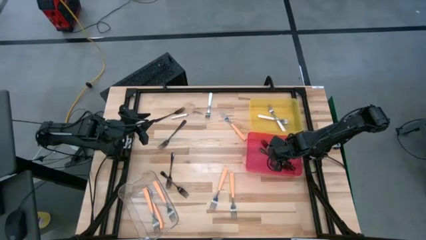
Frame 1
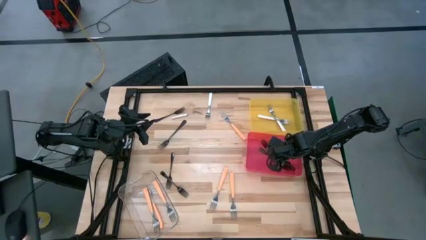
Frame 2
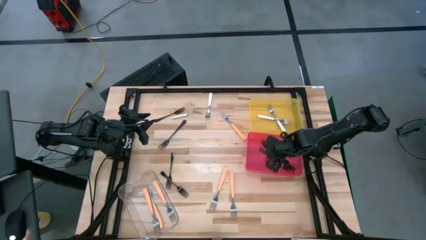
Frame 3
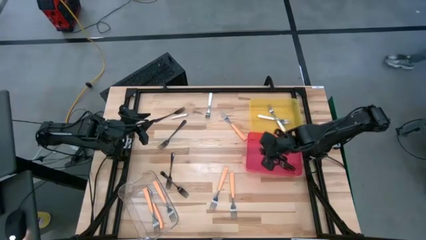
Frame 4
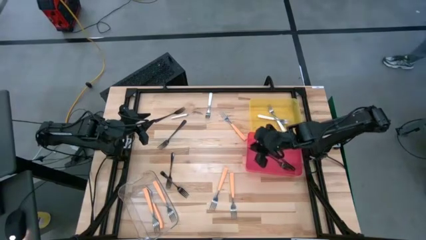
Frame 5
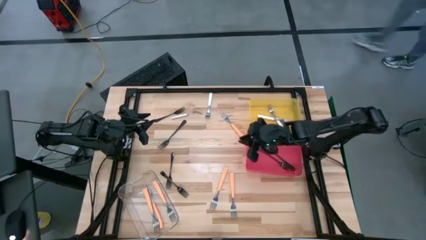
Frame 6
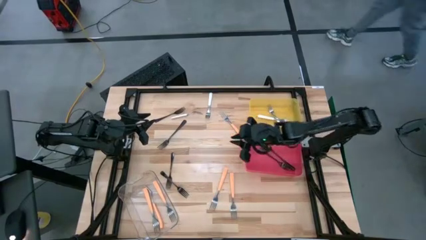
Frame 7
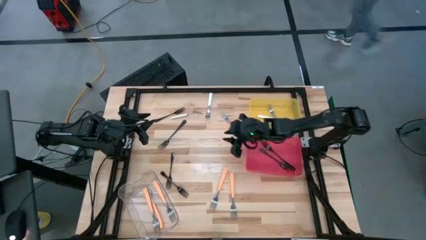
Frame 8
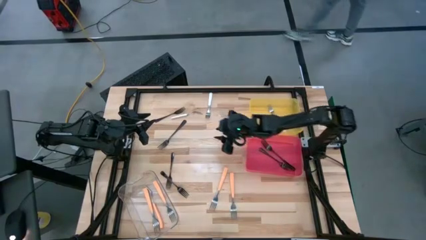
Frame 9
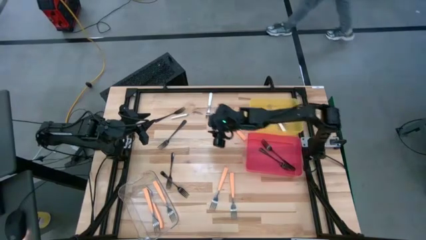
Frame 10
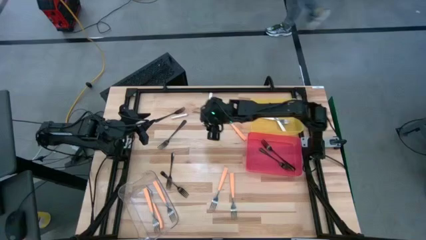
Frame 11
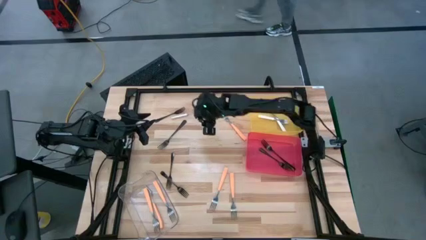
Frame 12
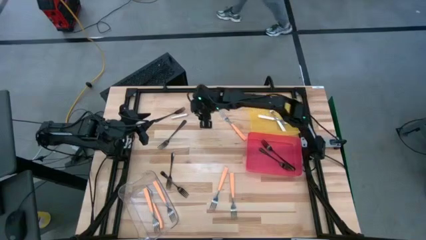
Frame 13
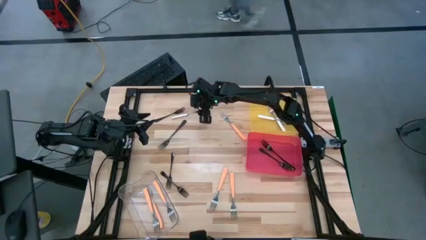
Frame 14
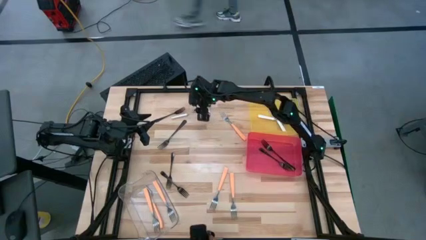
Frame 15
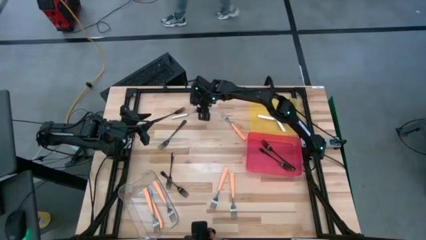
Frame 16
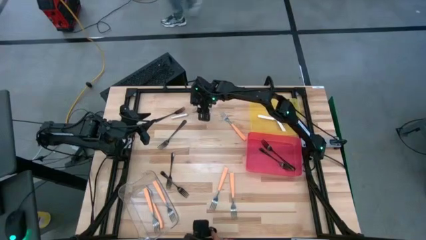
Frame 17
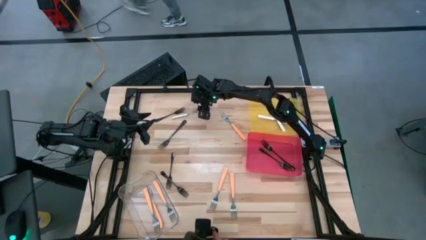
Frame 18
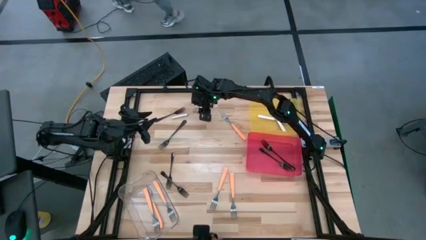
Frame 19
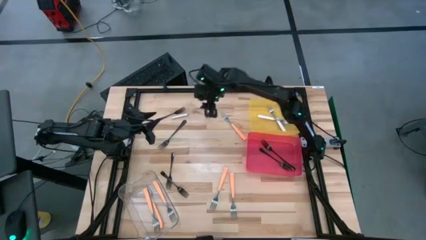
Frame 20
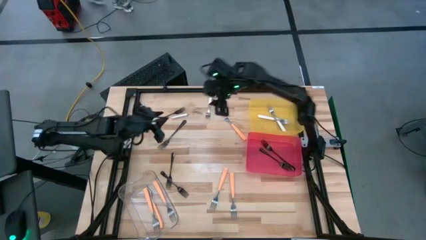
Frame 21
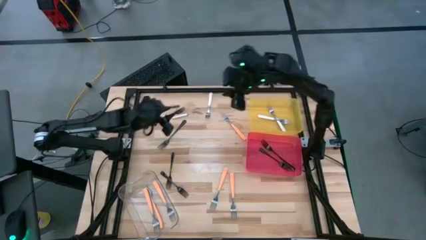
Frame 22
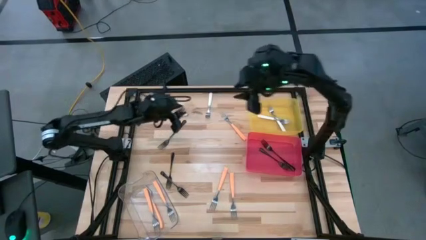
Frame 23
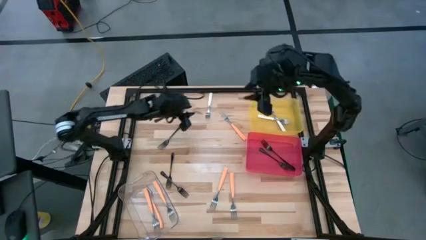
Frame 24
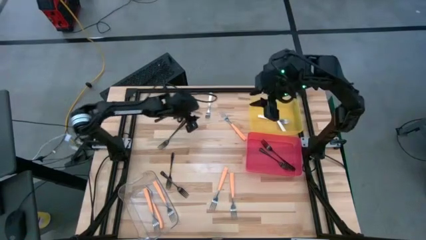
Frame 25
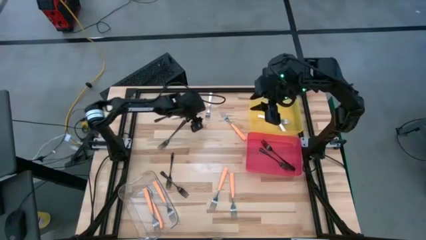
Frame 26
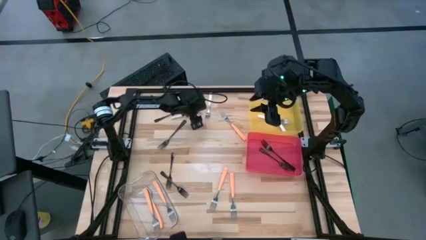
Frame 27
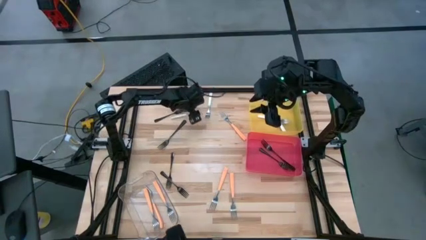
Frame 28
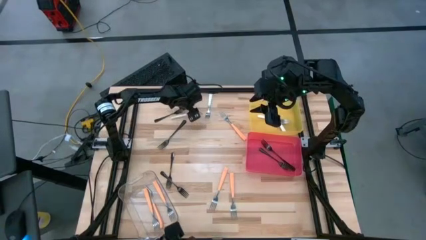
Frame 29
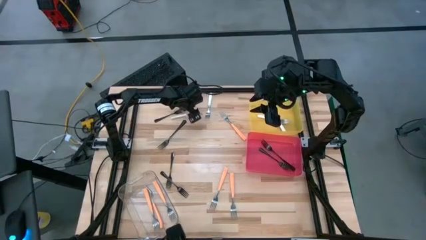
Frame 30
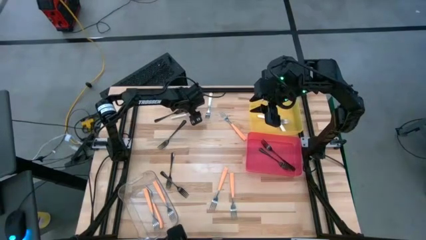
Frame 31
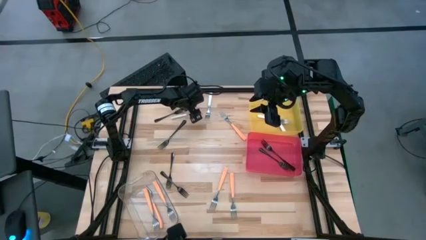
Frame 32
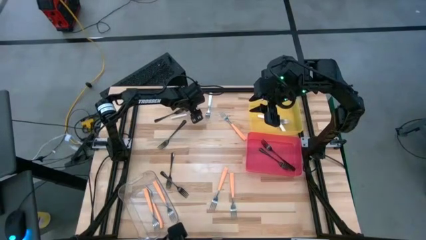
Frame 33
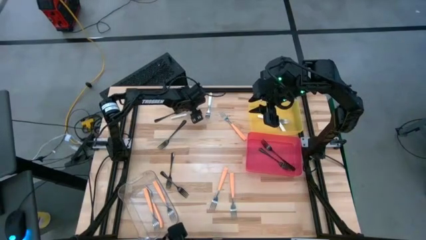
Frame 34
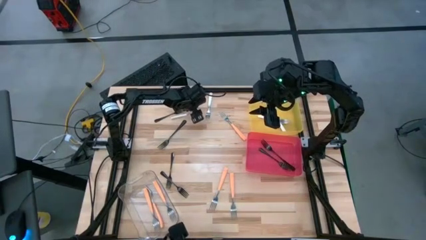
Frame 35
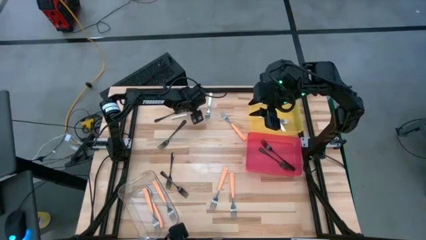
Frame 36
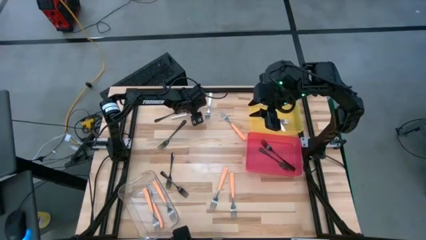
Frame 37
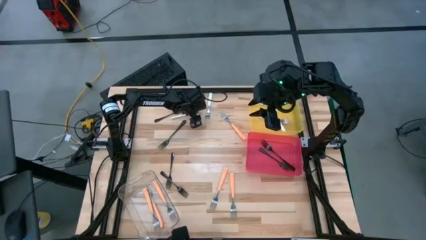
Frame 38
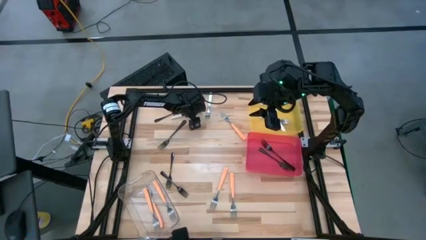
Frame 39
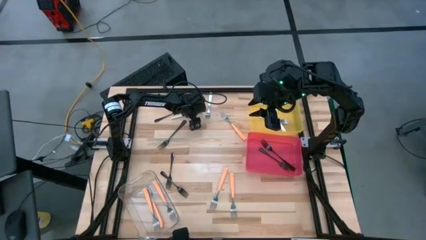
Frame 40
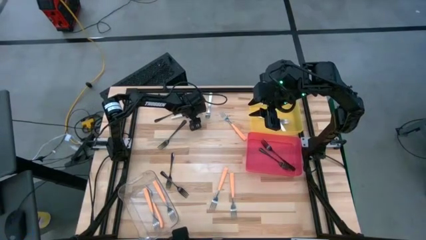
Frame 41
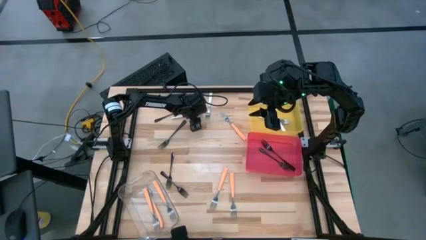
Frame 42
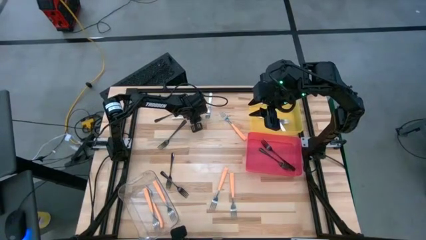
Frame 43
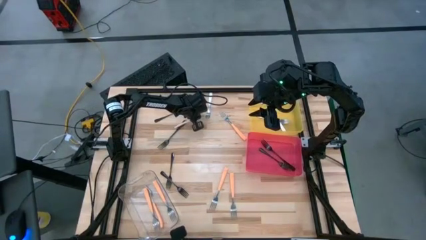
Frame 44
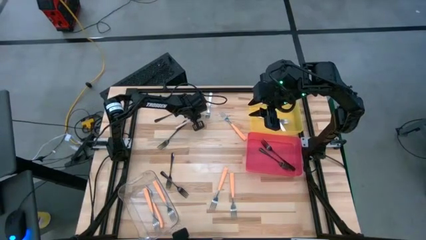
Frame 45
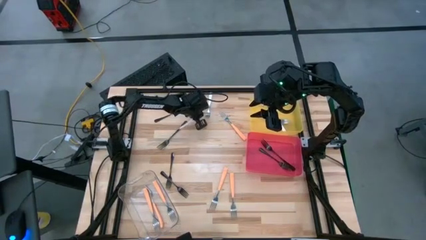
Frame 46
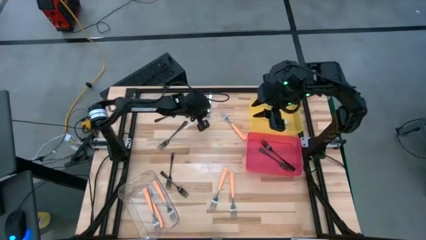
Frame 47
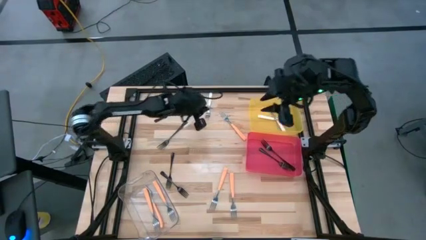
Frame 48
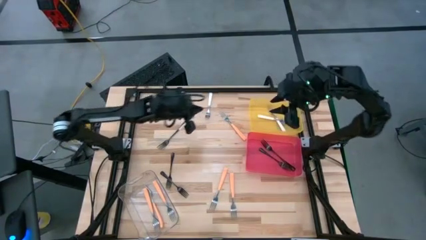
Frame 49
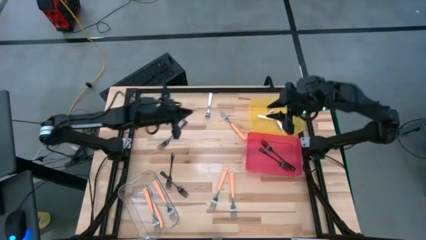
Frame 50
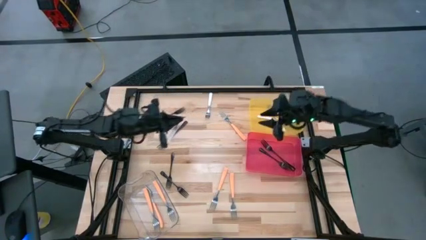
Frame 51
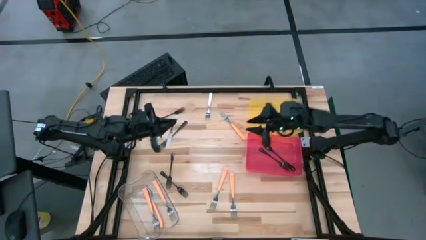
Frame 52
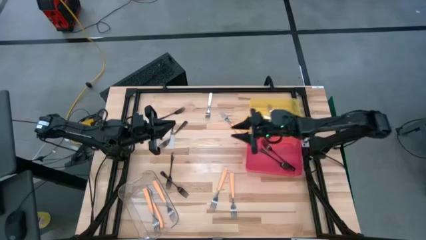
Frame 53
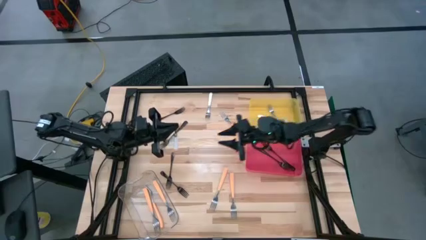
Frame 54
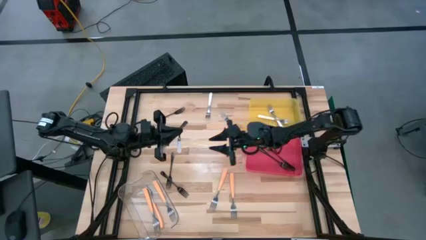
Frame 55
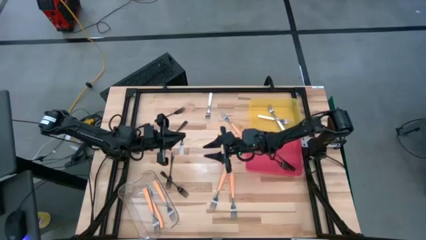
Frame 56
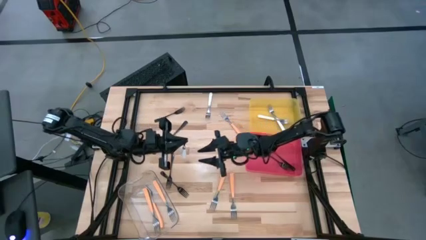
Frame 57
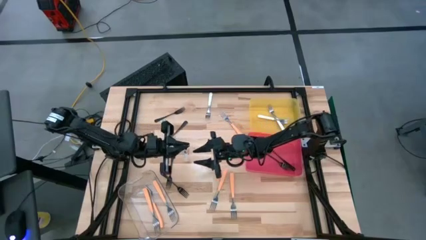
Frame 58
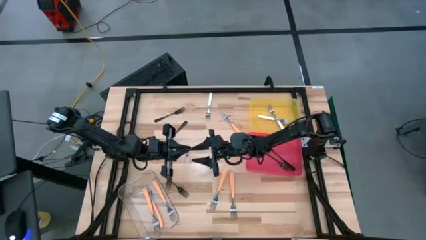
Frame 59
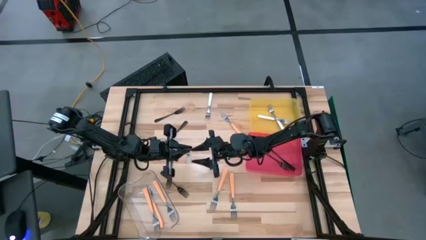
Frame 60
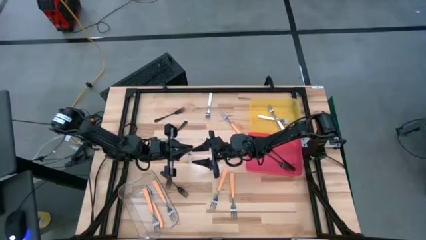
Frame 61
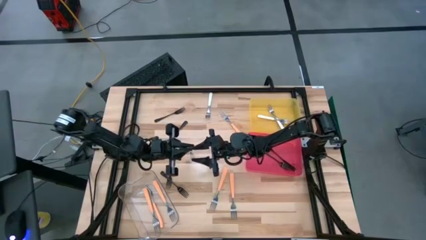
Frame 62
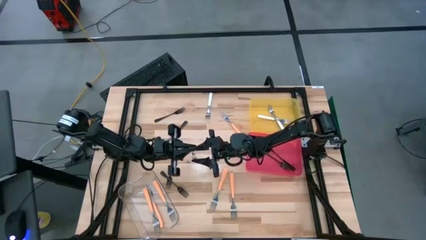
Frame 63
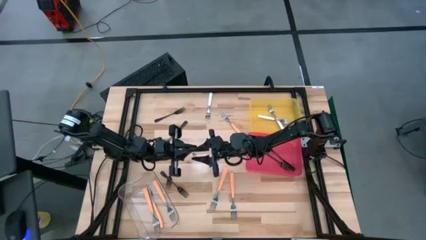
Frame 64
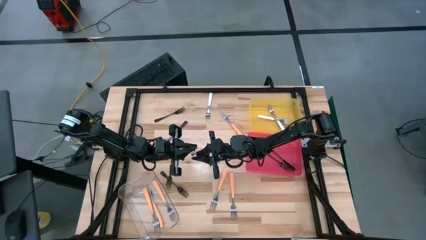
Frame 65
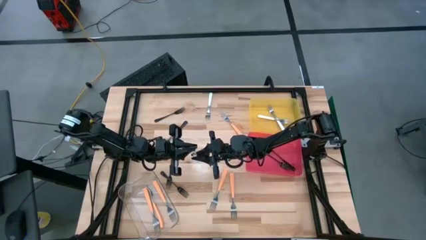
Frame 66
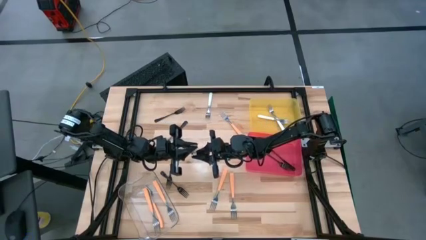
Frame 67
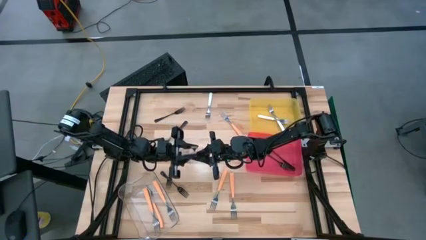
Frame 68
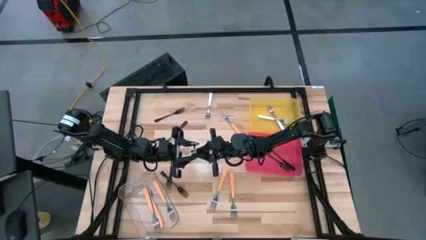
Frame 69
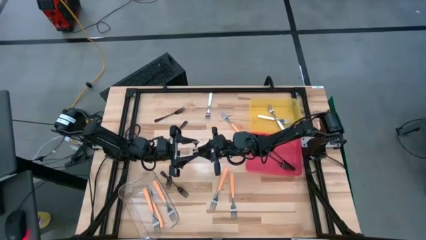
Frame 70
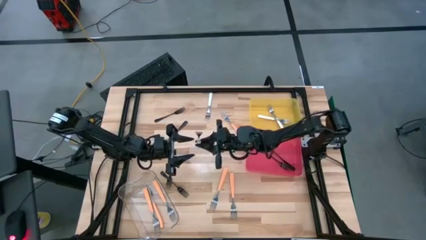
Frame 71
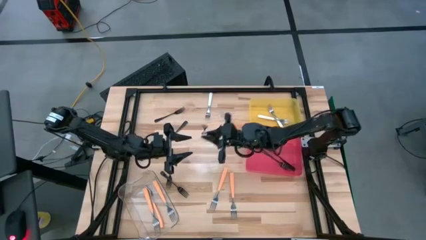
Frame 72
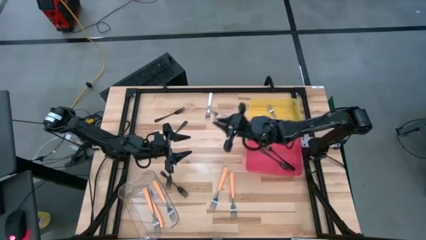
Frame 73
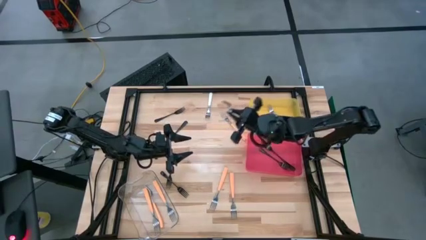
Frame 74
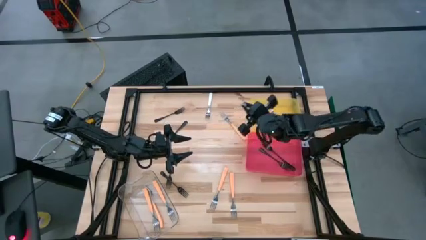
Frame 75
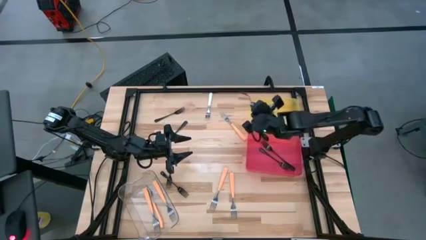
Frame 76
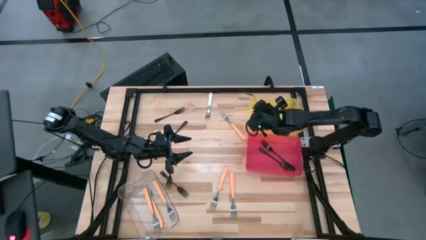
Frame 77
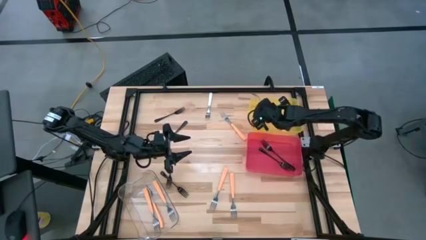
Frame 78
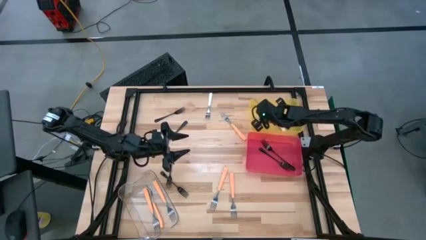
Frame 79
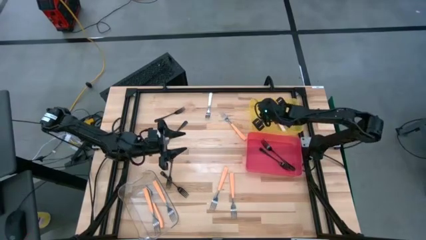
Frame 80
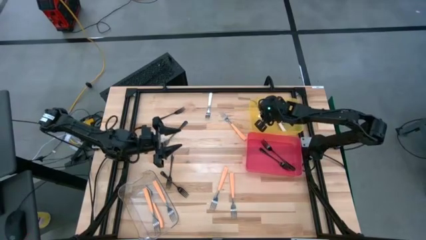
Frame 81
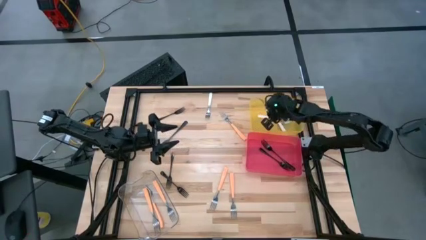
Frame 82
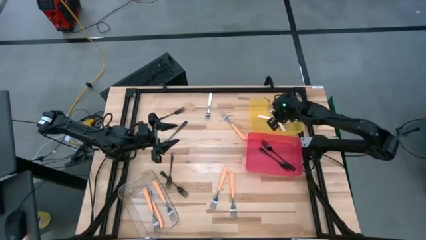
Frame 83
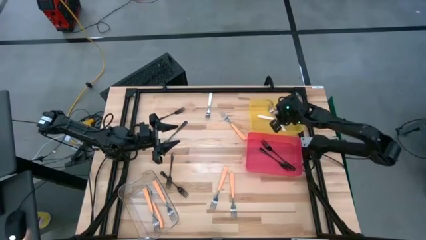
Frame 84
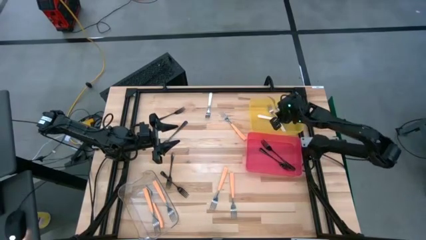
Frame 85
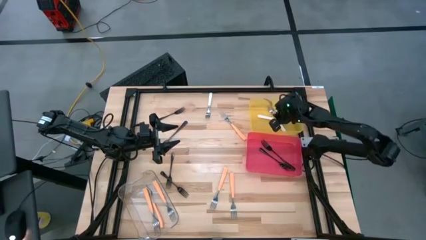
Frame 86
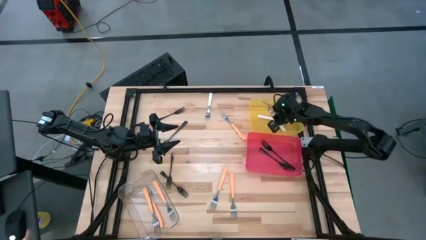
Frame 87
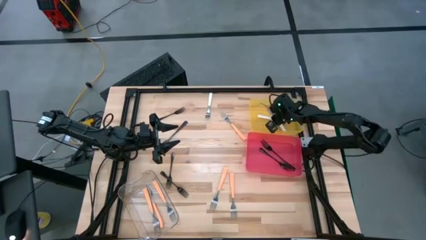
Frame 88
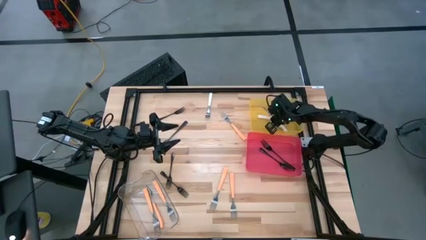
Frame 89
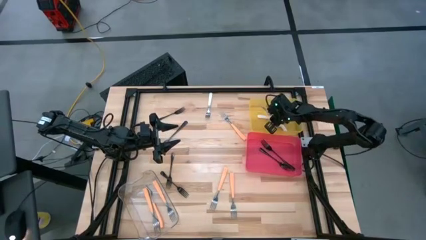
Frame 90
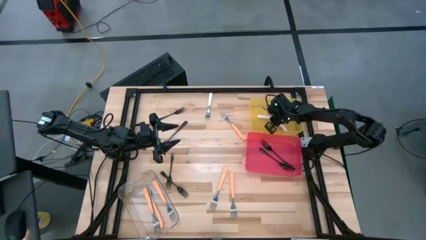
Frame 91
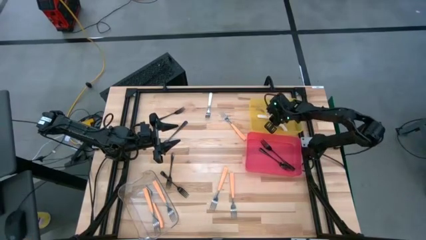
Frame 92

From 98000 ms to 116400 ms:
Task: Sort silverware by color (type)
Put the white fork into the yellow bin
